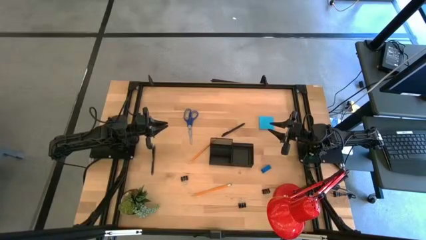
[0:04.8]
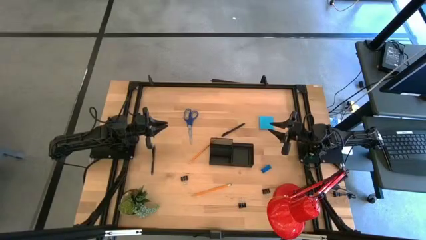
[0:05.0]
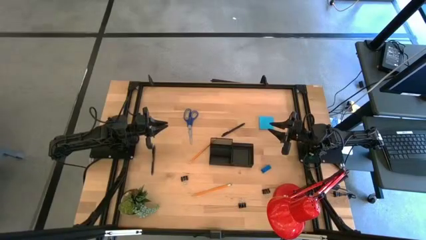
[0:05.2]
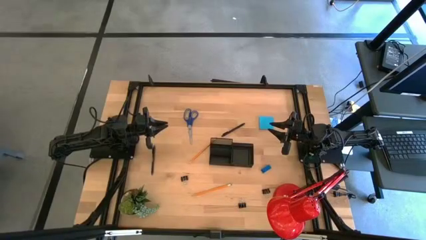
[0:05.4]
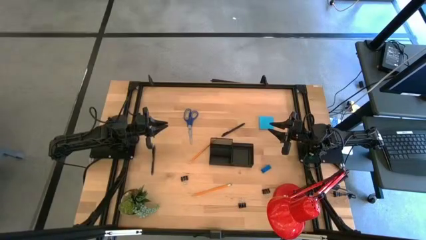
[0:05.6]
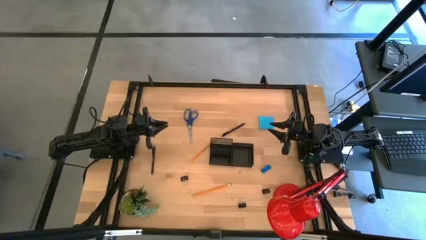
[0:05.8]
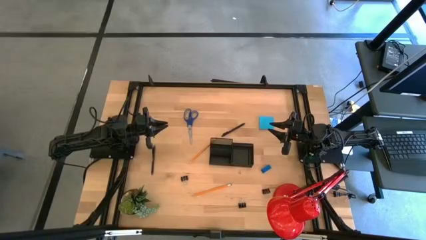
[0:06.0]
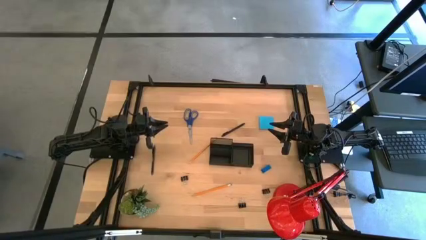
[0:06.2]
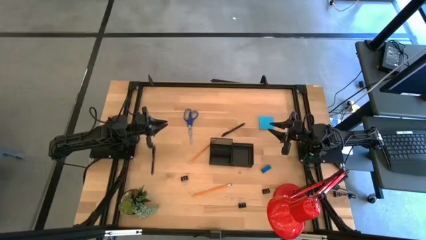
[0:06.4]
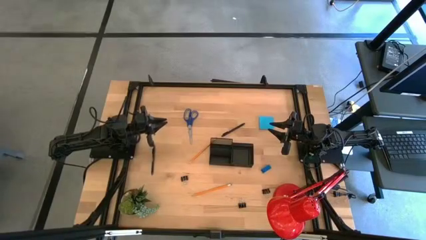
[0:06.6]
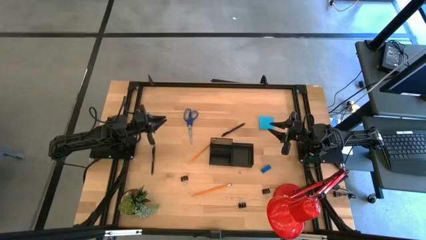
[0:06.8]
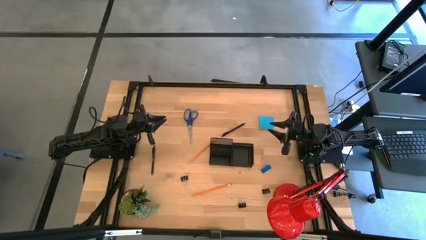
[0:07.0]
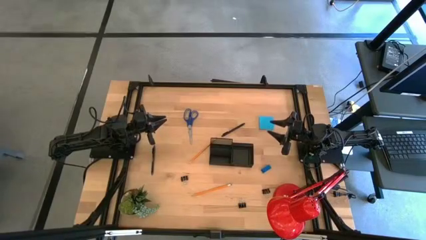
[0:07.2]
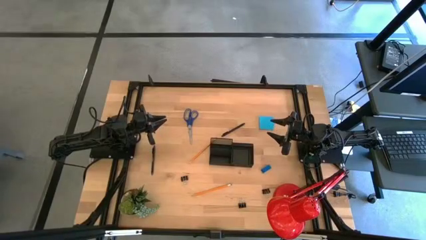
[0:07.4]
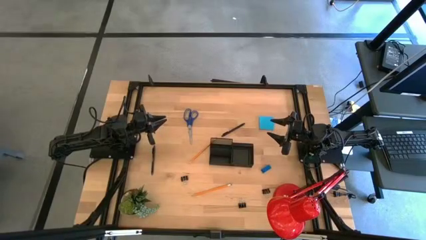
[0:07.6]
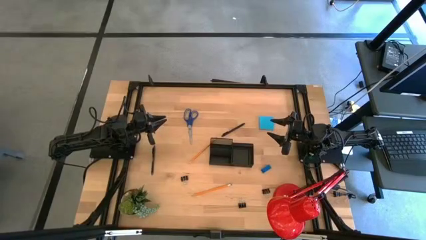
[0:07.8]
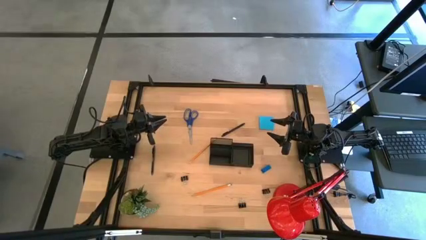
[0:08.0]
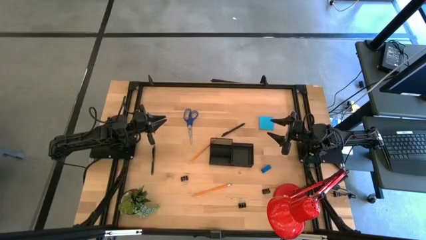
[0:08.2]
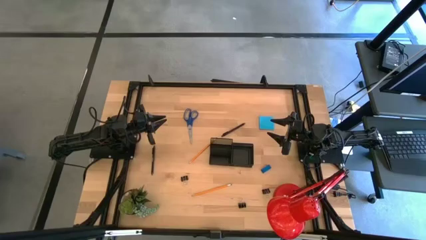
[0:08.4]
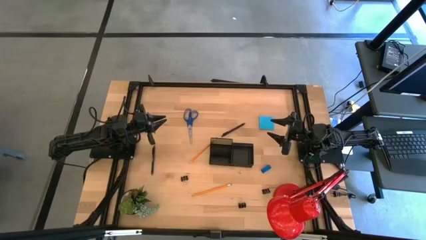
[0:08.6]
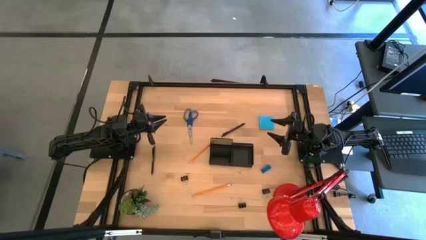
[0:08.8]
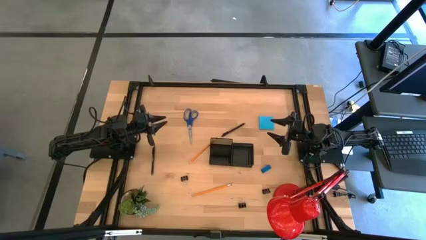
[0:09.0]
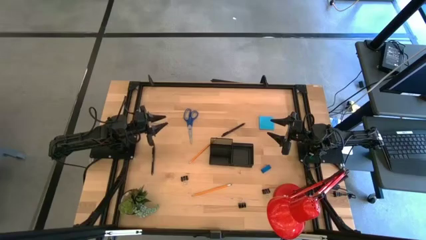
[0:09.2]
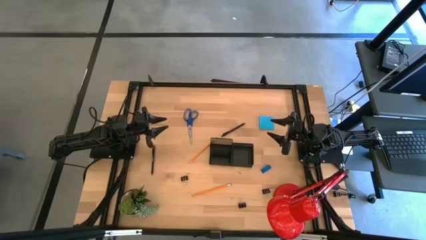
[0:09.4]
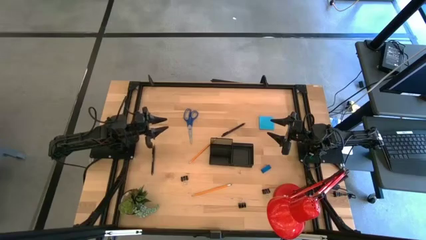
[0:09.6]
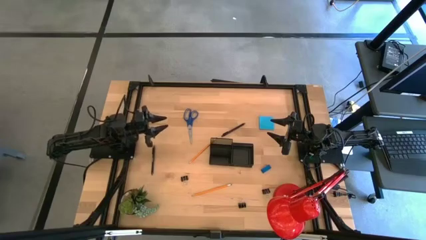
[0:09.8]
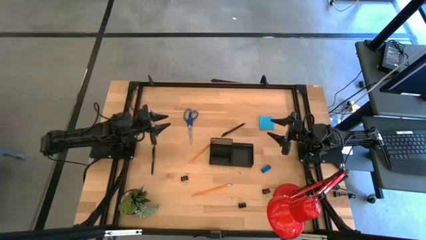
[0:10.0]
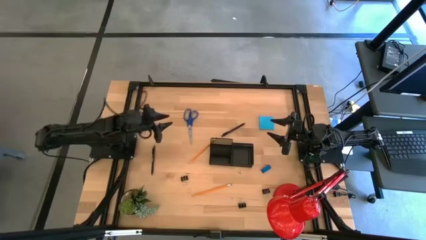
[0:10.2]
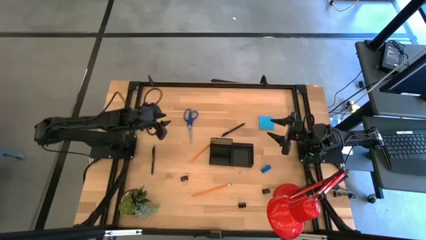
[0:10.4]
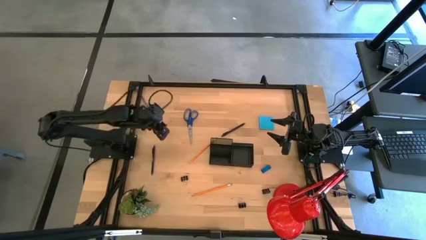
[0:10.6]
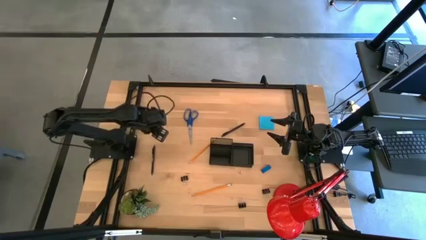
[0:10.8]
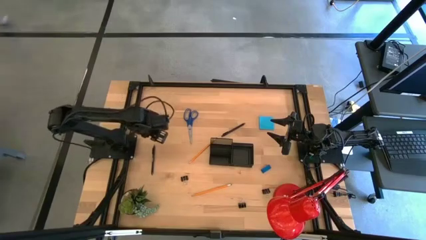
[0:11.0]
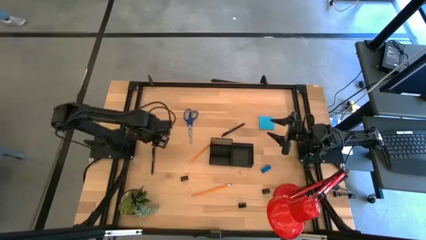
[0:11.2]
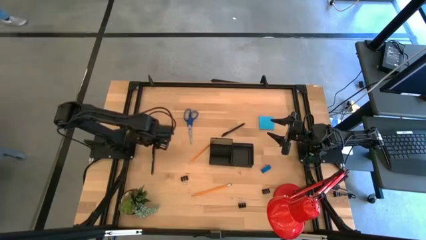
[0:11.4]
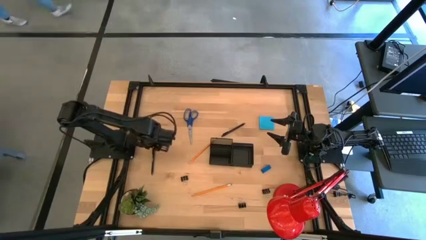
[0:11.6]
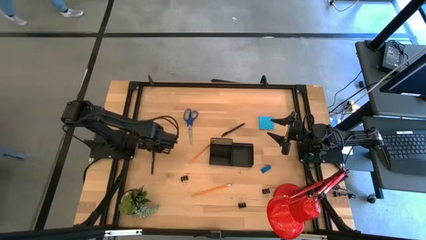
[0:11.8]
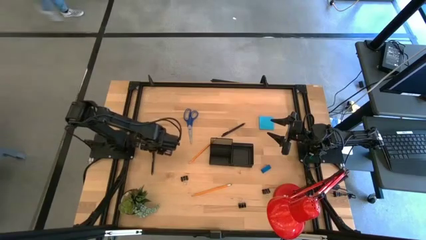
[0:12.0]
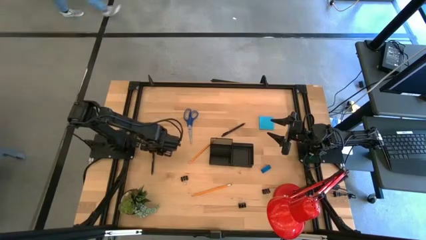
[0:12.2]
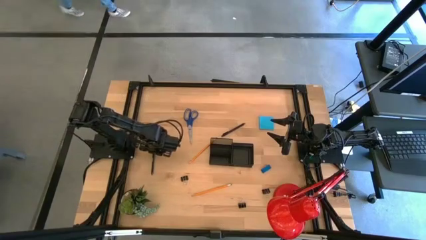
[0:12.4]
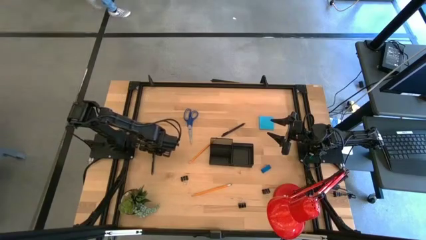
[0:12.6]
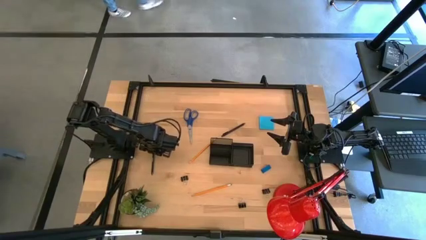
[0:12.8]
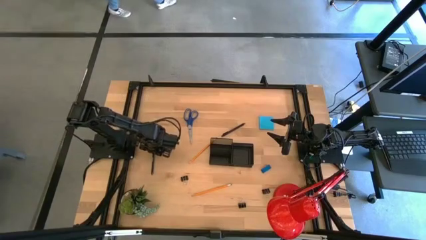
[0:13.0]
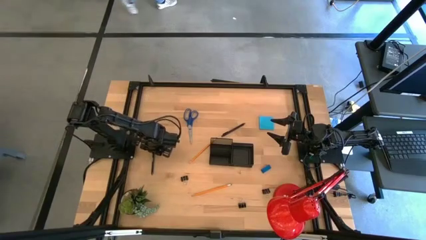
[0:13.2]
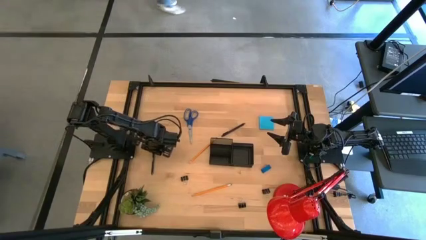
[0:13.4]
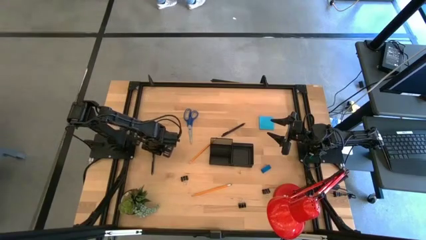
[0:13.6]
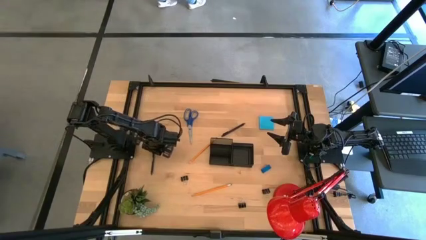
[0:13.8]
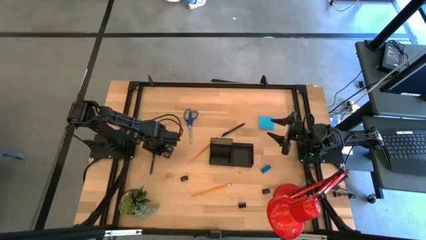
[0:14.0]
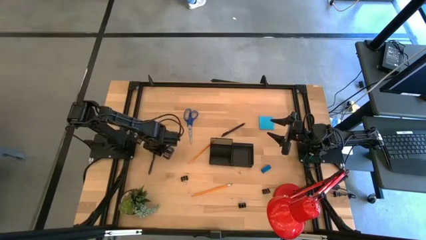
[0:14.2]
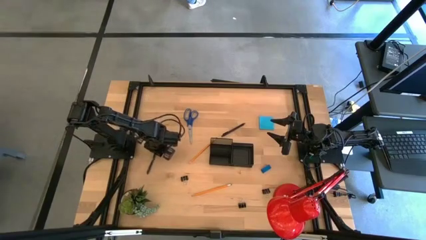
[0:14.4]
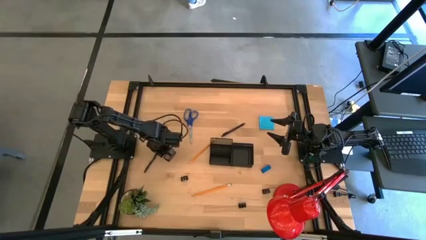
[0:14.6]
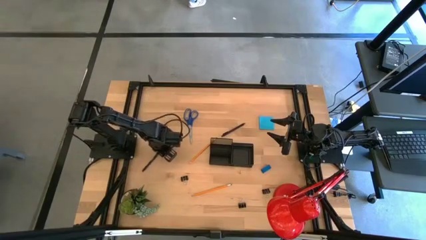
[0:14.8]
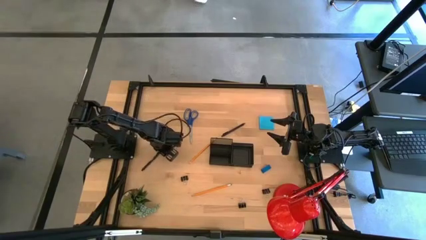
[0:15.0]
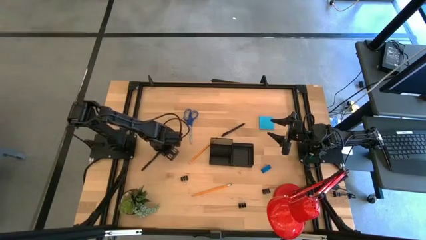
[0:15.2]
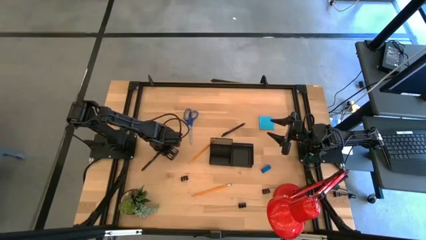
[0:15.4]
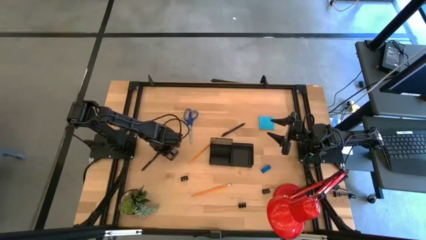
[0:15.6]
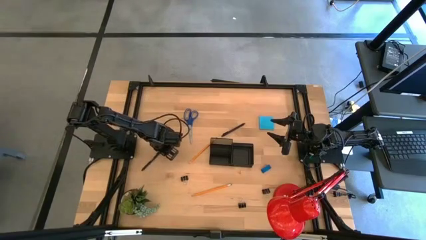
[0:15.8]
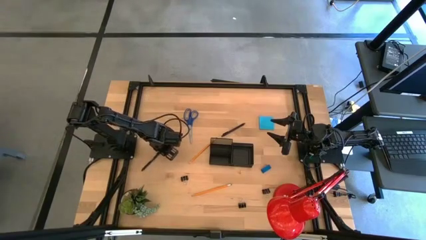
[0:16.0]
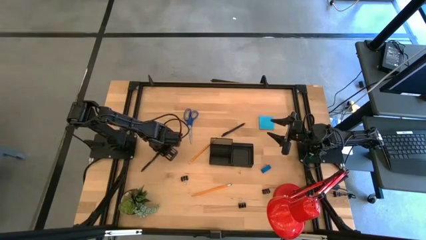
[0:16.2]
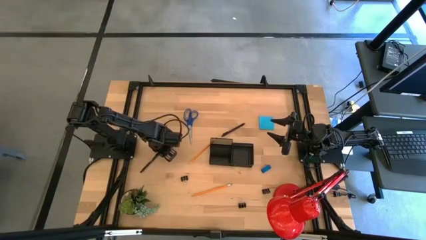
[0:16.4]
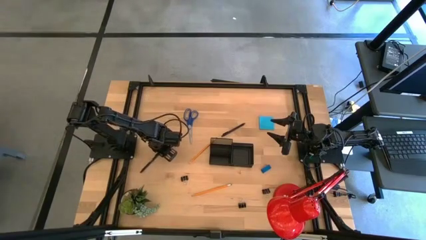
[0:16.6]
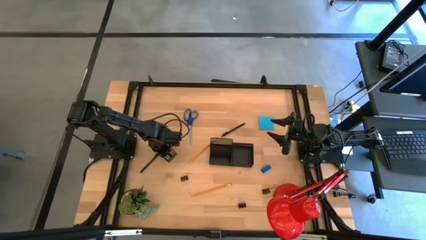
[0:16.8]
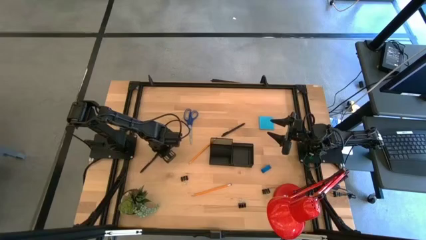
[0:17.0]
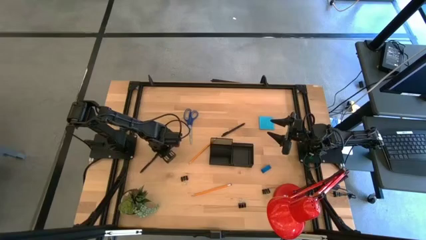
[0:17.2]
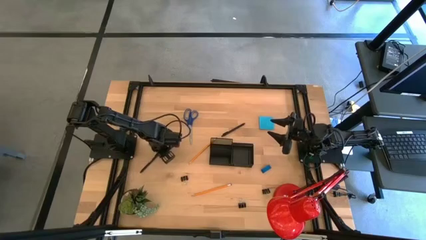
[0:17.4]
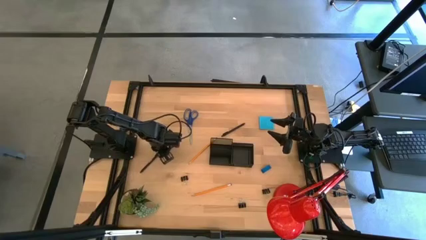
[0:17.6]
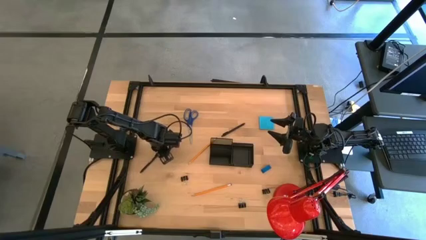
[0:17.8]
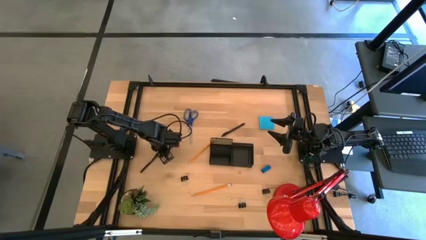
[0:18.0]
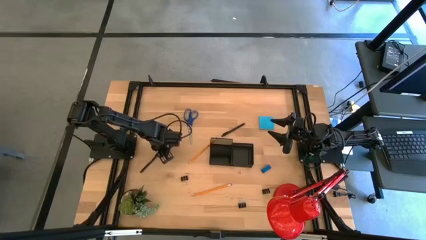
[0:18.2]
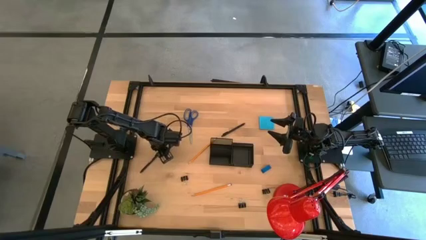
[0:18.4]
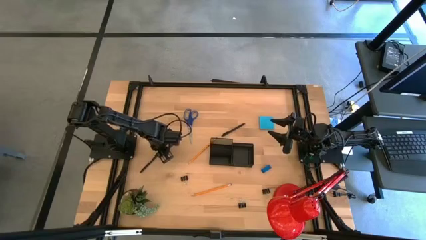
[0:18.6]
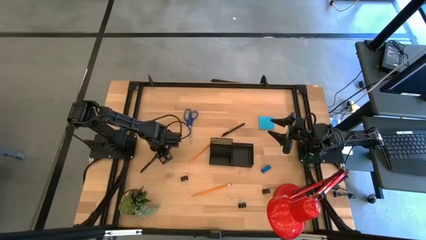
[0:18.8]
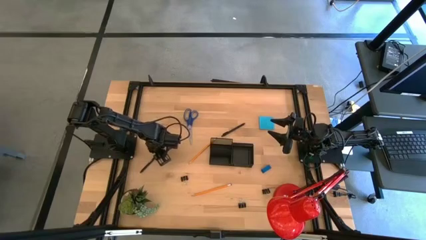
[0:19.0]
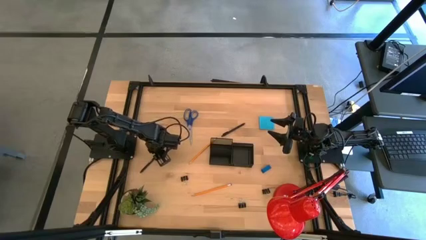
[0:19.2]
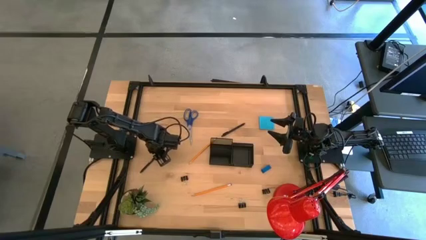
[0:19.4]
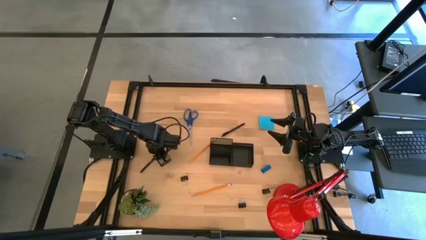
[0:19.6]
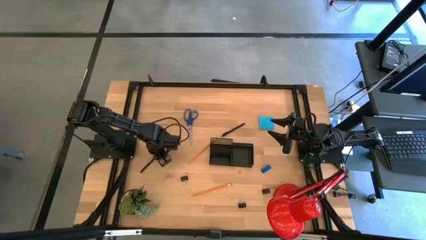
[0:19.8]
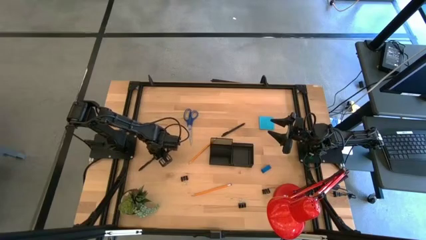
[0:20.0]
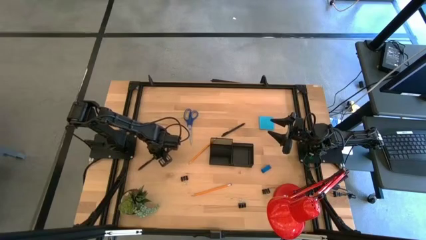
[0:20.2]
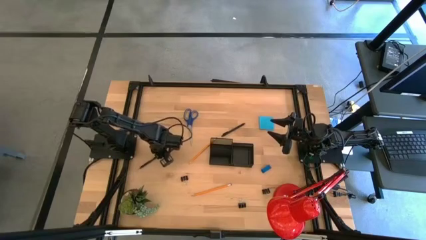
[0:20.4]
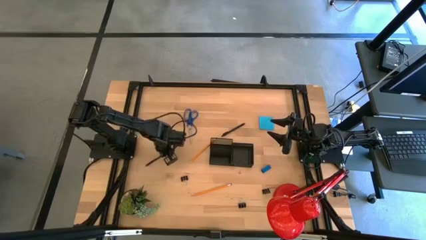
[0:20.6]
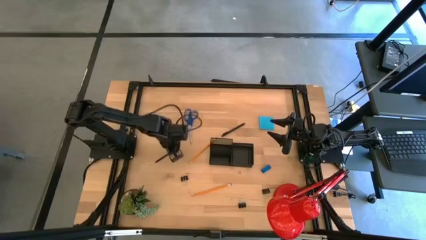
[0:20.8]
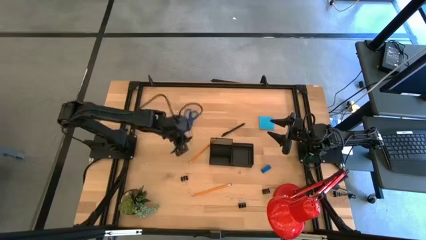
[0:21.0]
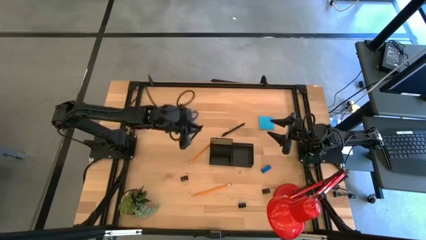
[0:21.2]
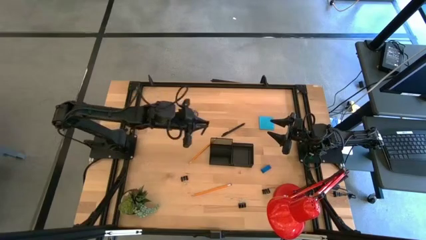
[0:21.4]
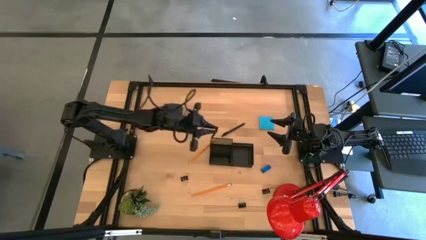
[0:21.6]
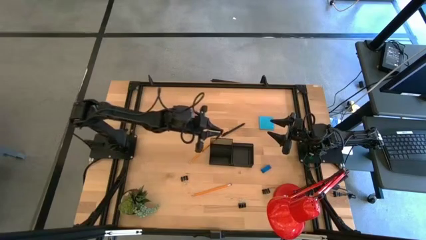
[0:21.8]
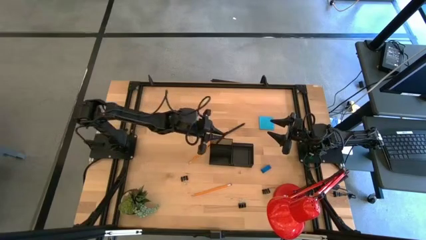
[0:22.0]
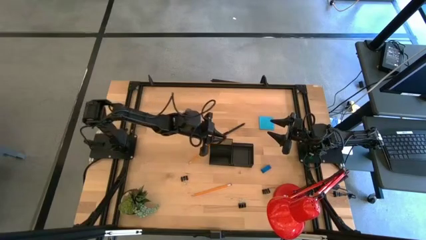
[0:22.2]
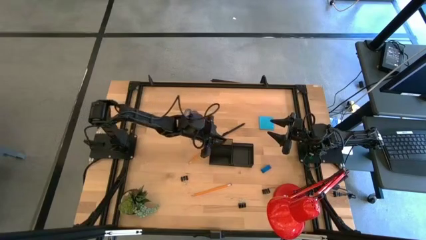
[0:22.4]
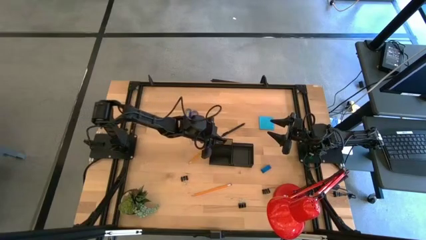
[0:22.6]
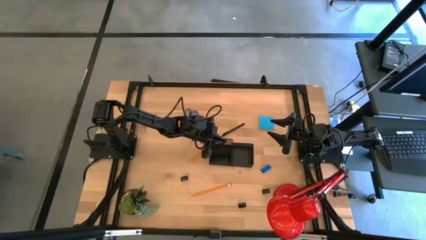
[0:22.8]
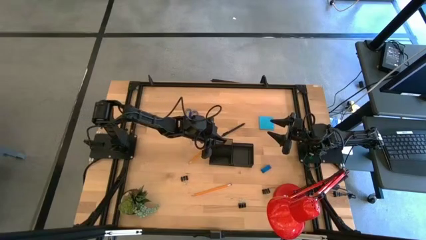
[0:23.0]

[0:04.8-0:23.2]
Task: Pick and place office supplies into organizer
Put the left black pen into the black desk organizer
